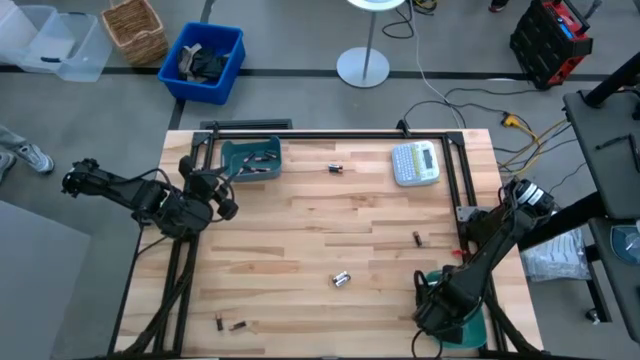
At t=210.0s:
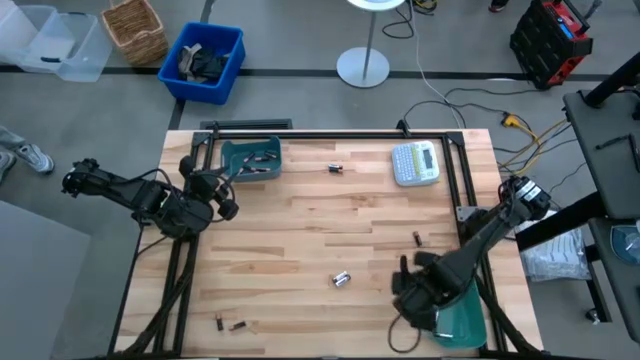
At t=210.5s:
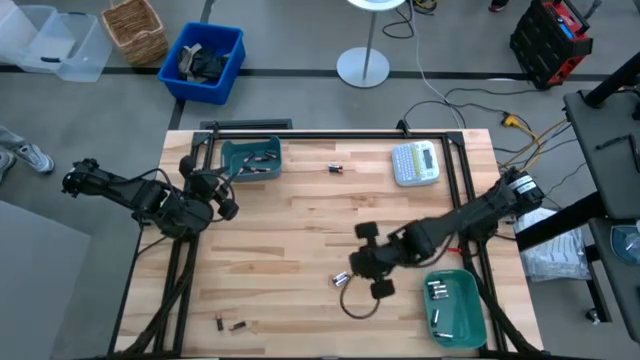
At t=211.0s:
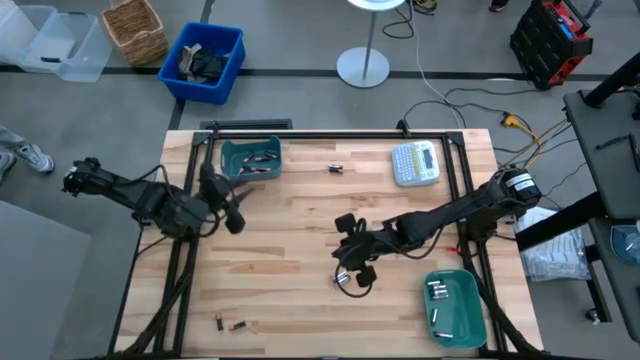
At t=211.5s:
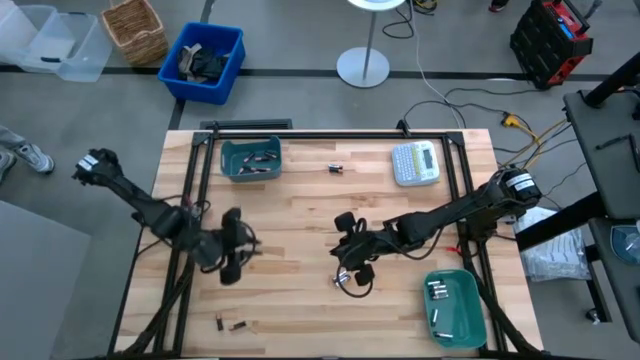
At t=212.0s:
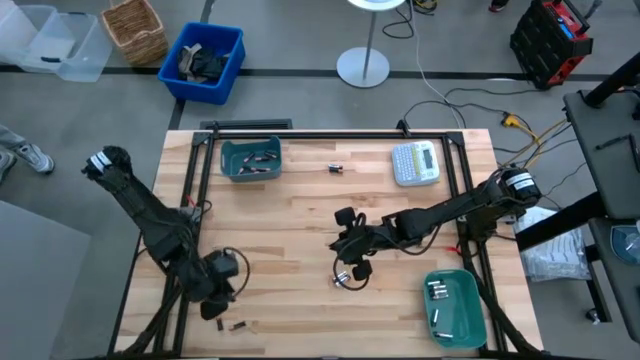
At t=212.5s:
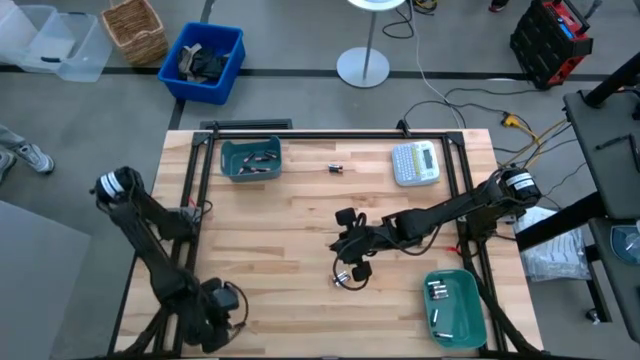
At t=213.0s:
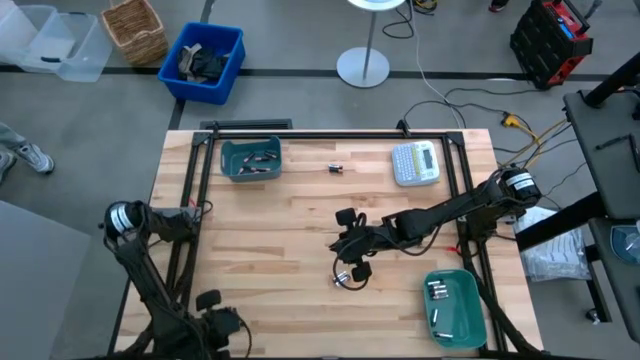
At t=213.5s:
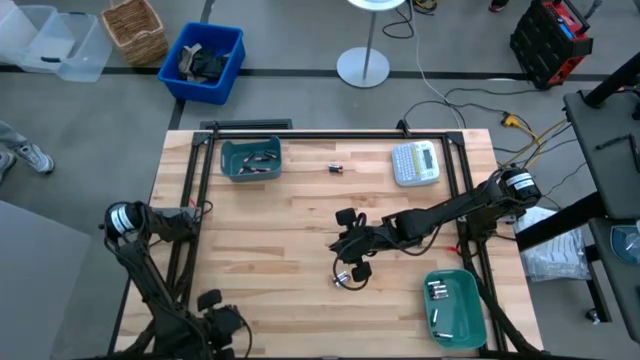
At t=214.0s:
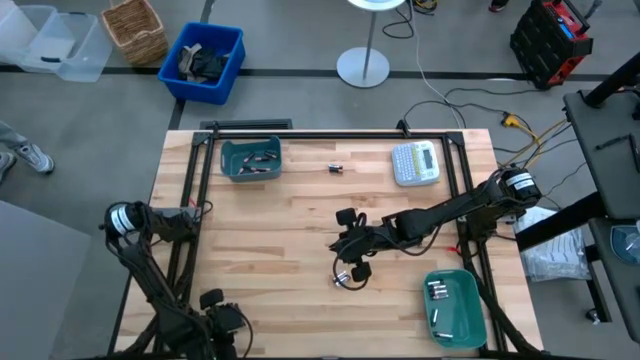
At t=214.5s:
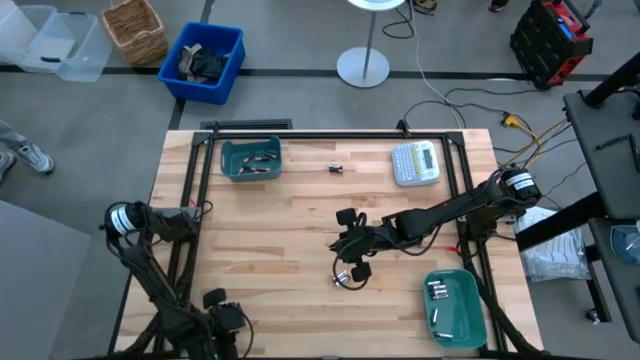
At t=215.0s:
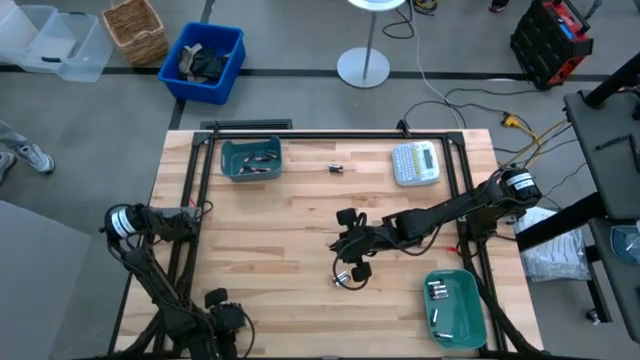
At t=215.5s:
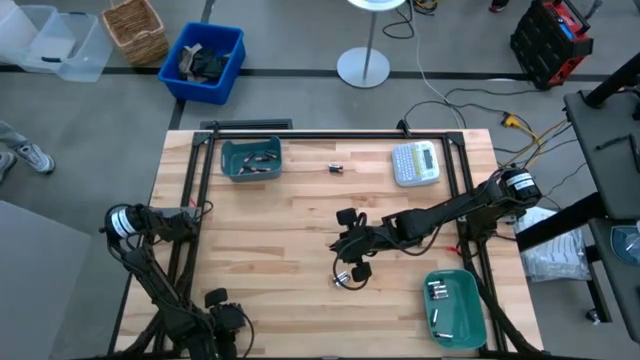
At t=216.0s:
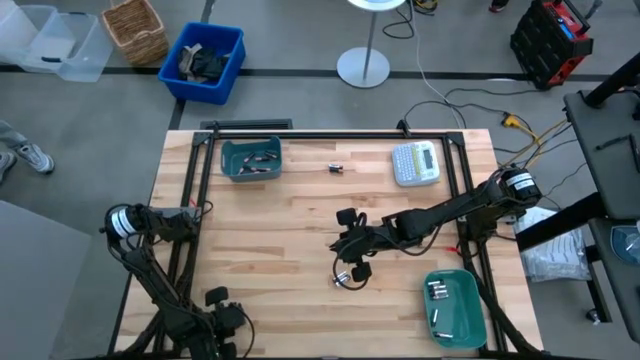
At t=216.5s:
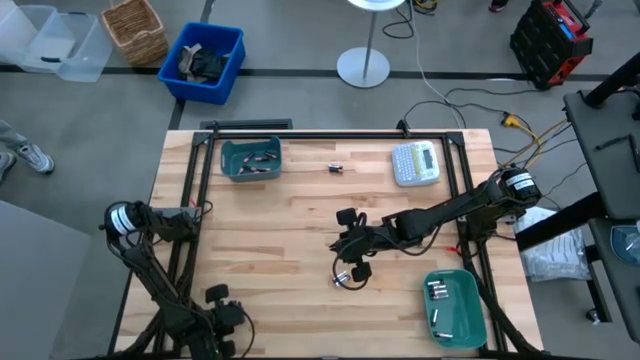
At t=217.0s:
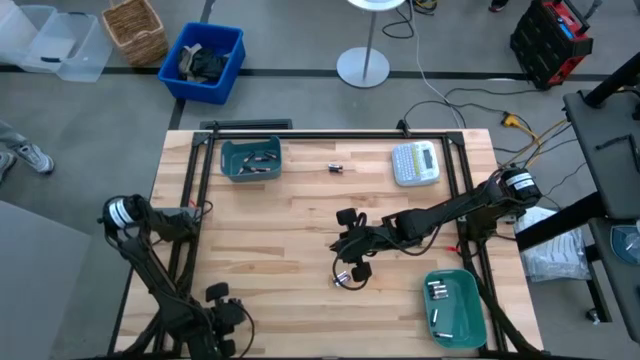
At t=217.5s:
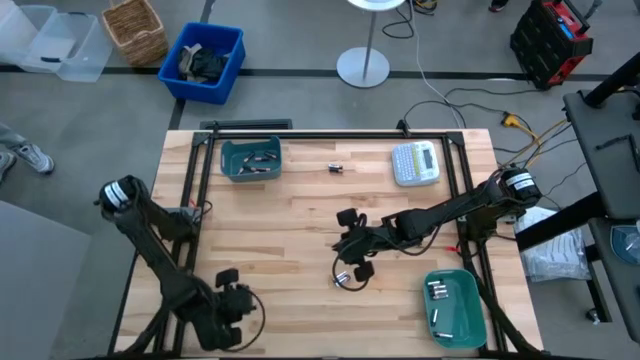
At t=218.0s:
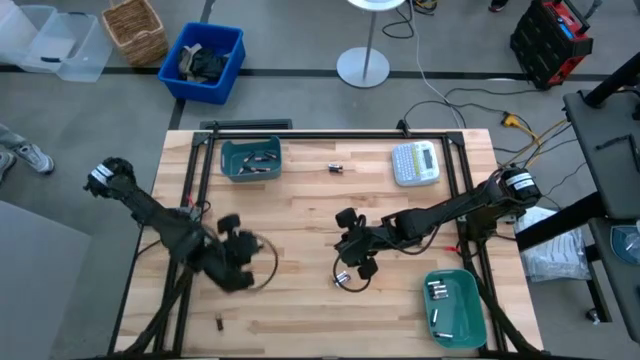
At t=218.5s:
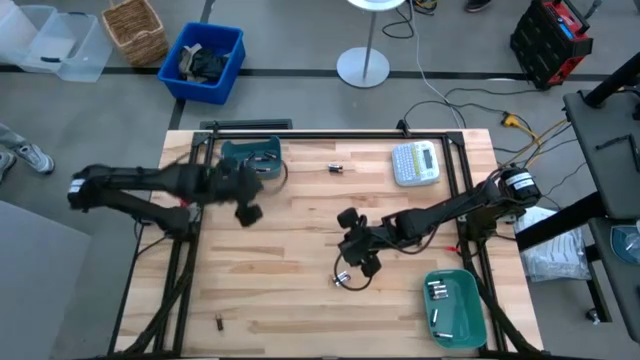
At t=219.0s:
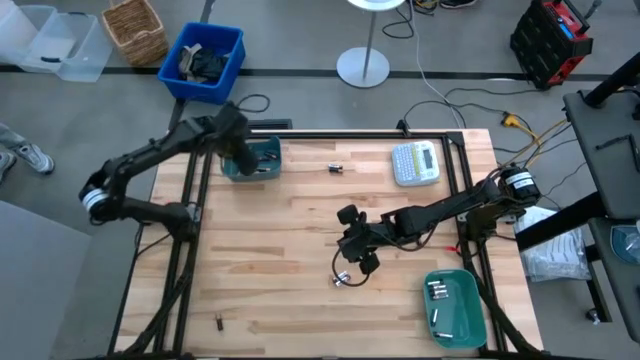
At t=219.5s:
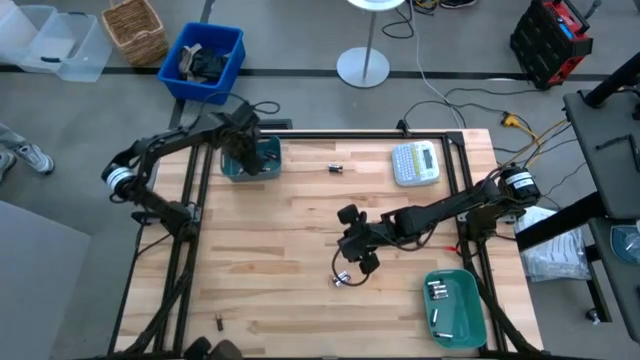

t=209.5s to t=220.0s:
Task: Sort batteries
Put the black battery into the blue bin

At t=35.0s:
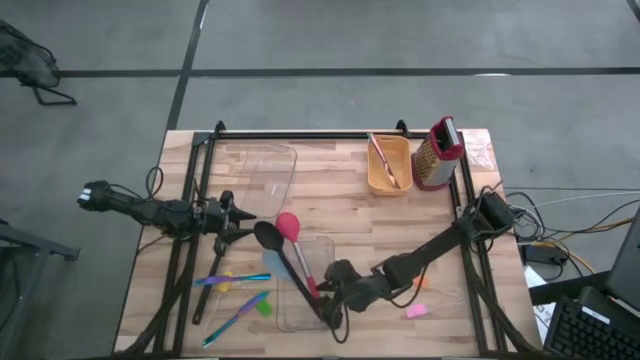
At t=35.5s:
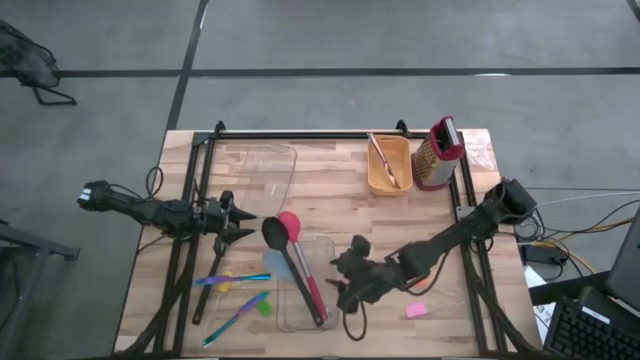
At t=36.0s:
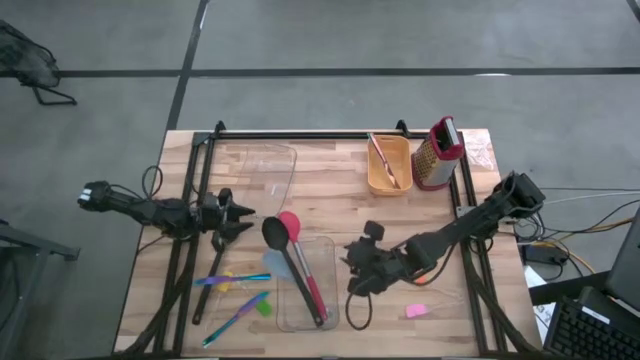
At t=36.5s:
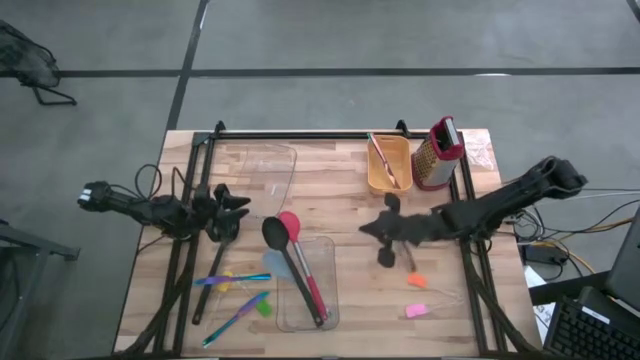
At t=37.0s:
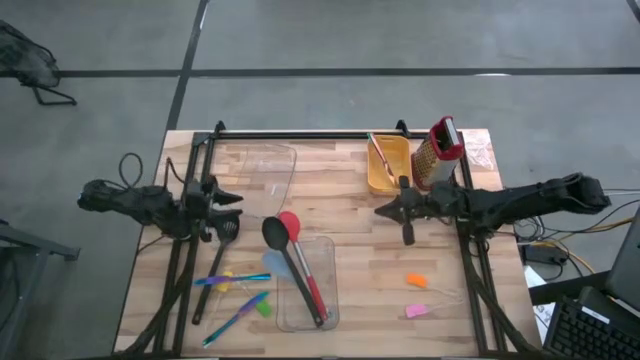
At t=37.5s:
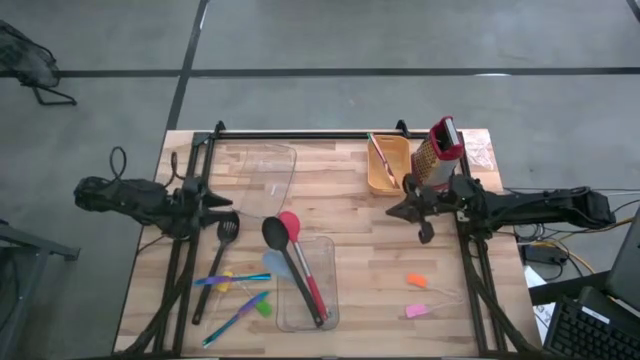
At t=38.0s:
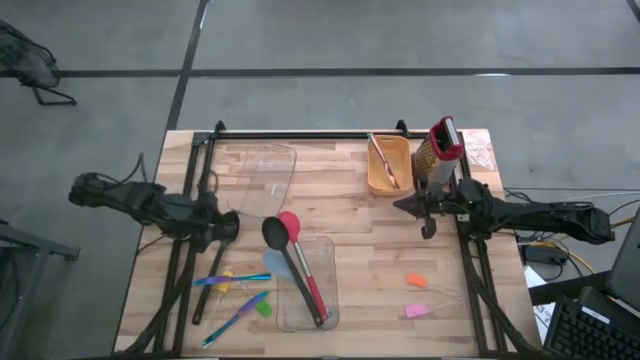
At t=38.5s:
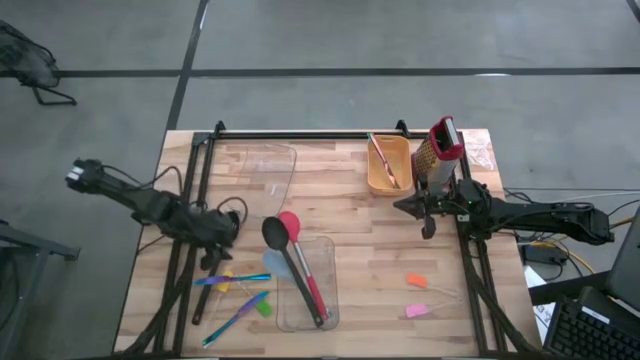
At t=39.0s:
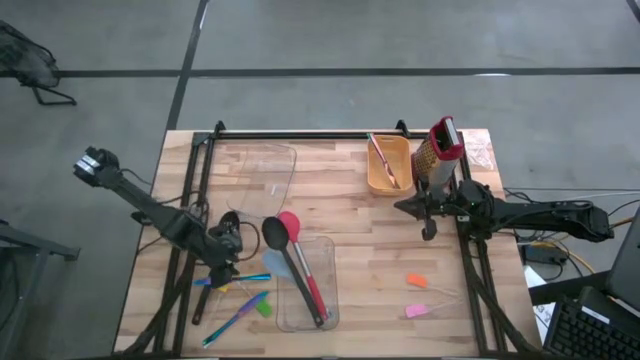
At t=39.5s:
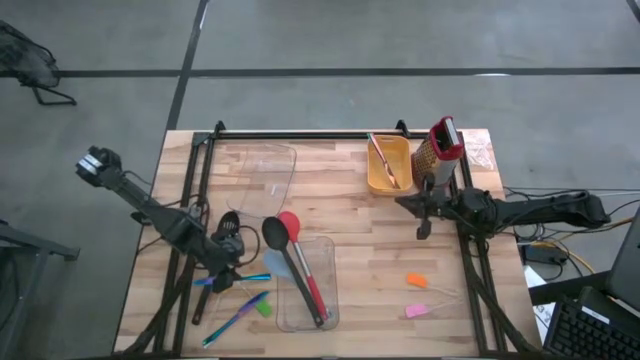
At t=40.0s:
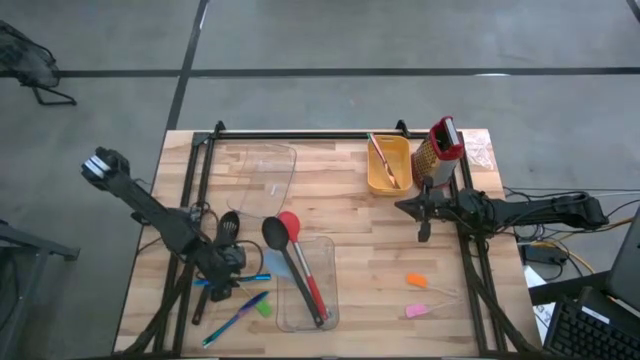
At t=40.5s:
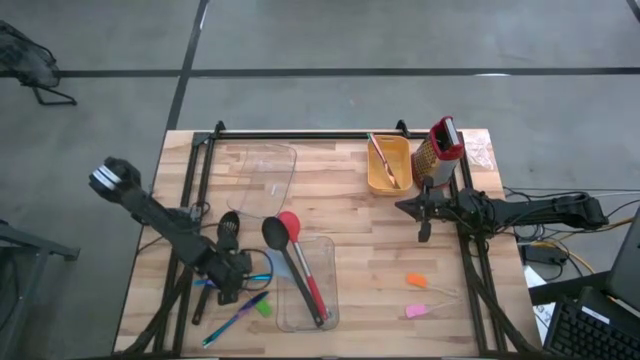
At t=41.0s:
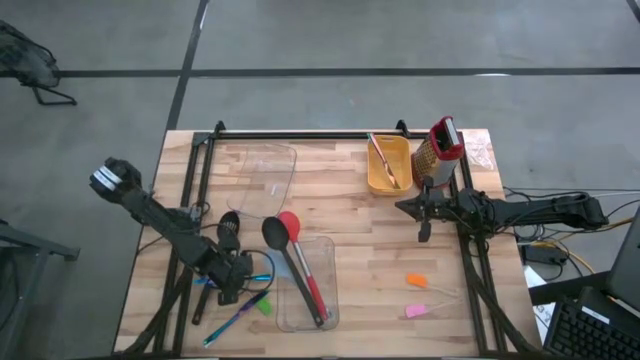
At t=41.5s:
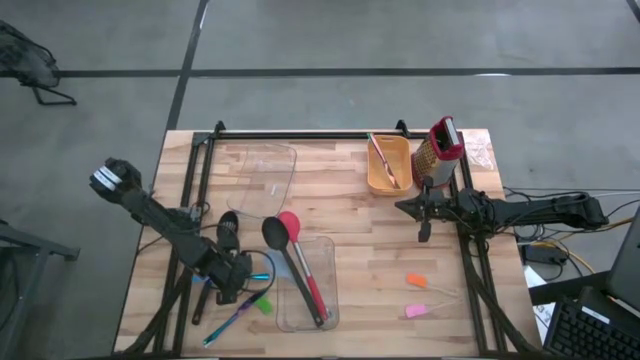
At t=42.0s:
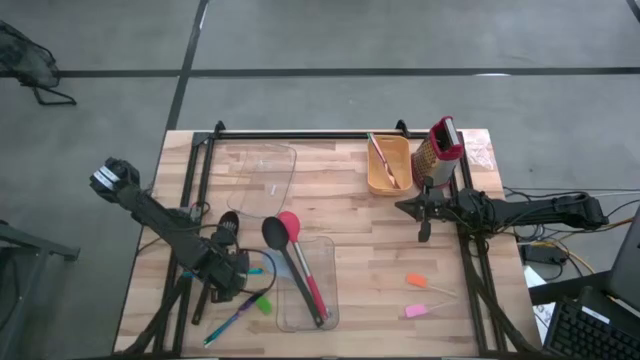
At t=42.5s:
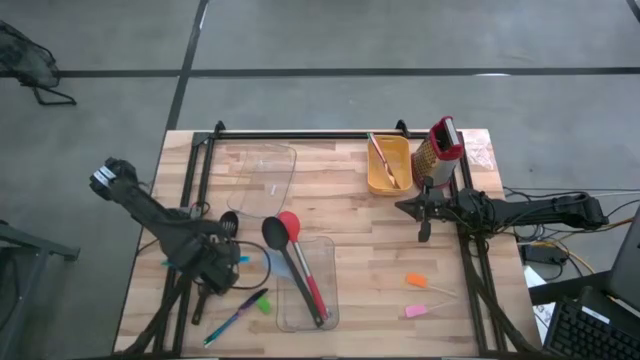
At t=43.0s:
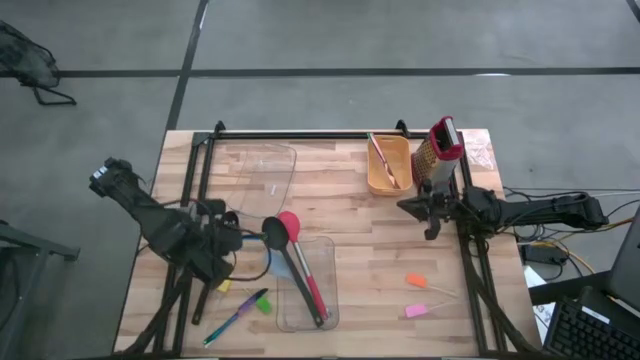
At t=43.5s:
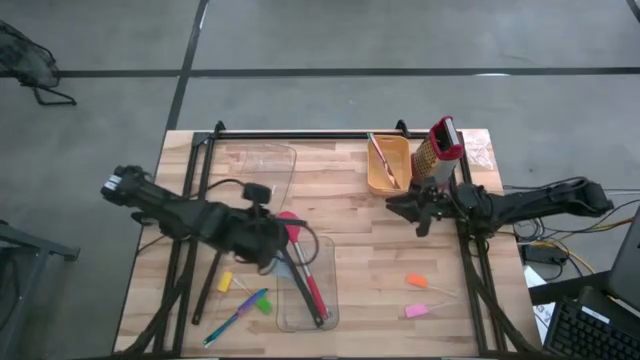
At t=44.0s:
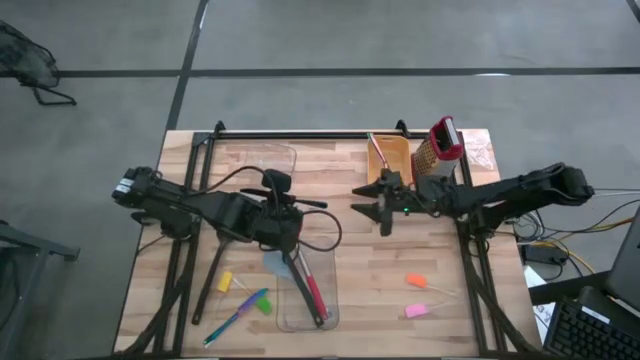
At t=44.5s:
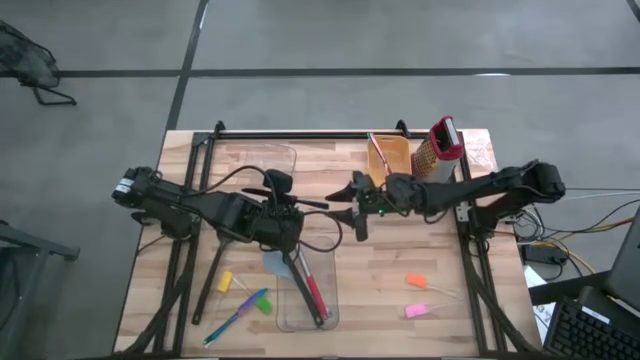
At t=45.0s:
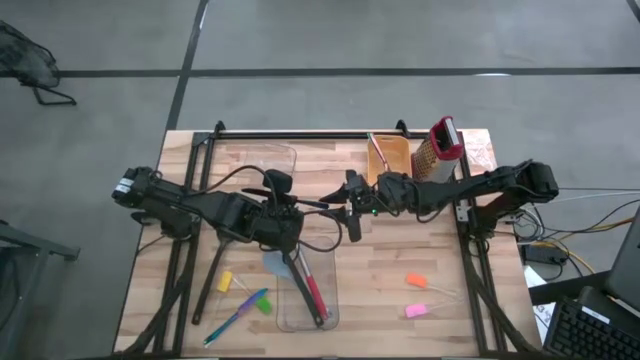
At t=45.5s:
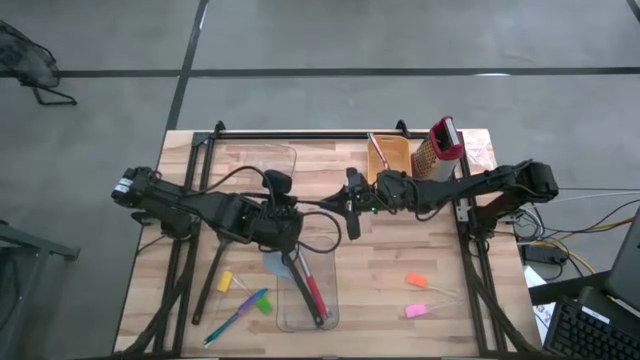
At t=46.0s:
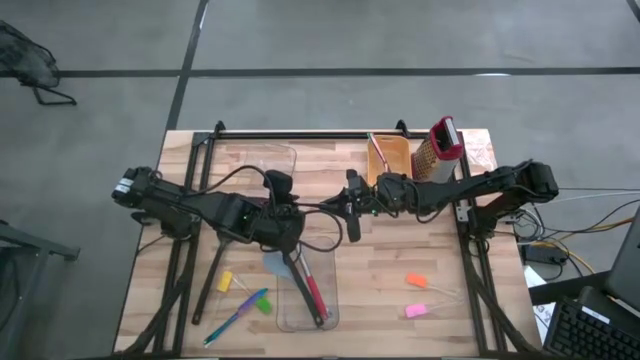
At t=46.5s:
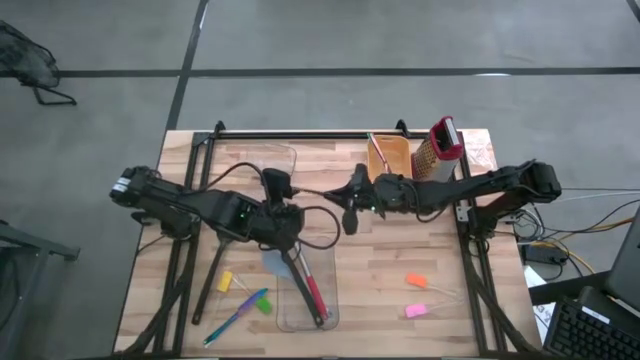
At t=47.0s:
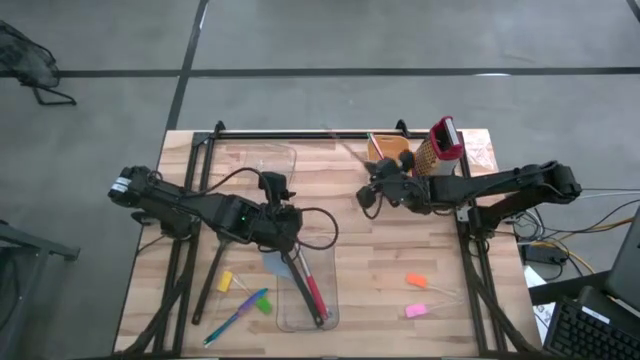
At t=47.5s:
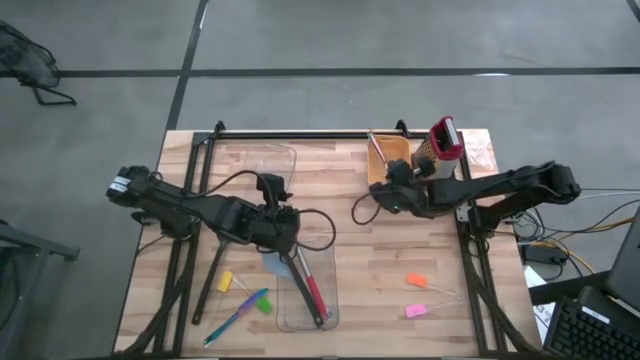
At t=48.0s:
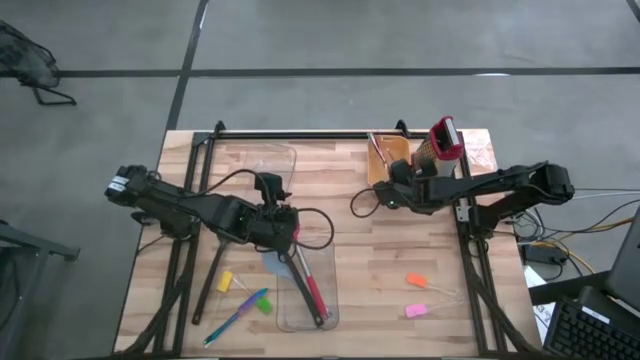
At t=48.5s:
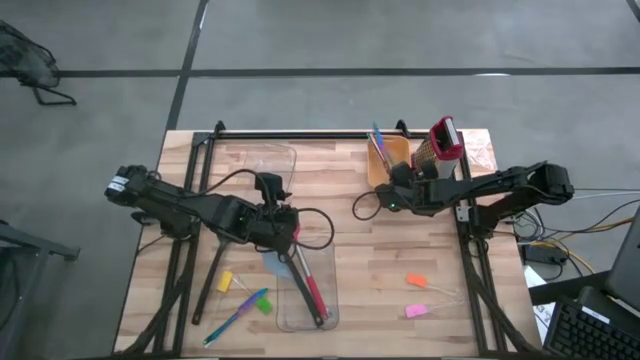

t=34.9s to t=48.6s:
Task: Pick & Place Kitchen Items
Put the top blue knife into the yellow bin
